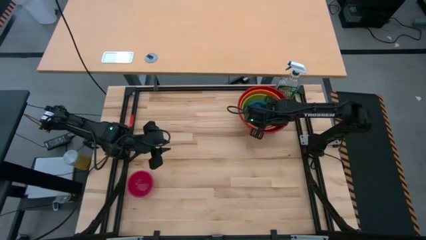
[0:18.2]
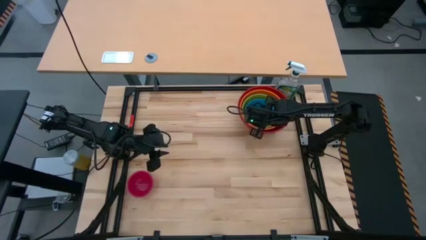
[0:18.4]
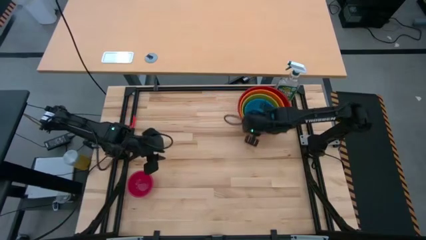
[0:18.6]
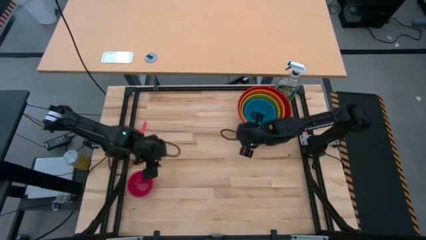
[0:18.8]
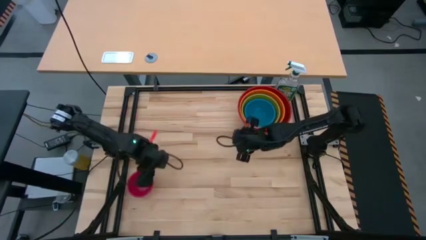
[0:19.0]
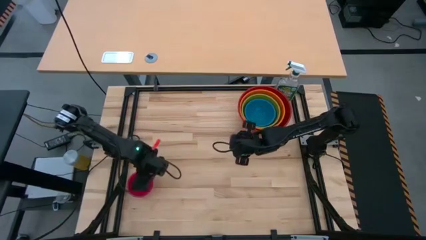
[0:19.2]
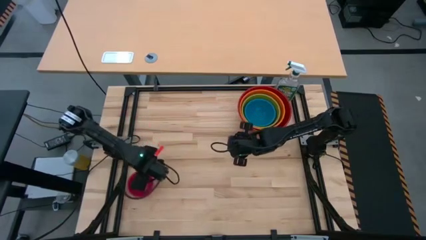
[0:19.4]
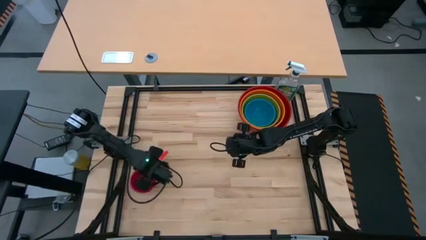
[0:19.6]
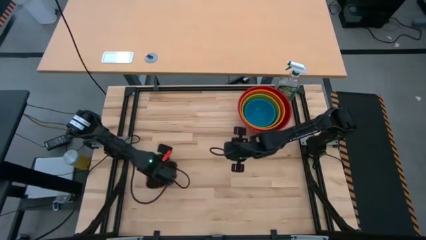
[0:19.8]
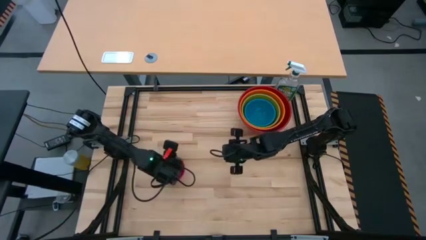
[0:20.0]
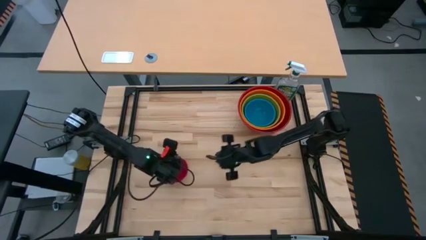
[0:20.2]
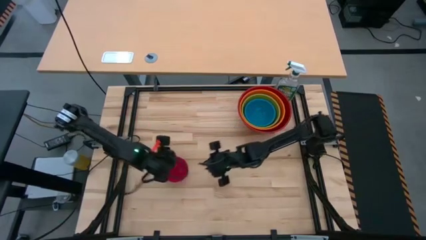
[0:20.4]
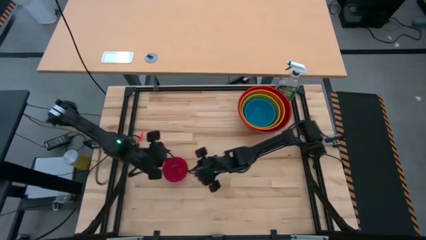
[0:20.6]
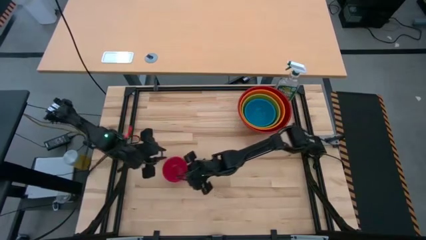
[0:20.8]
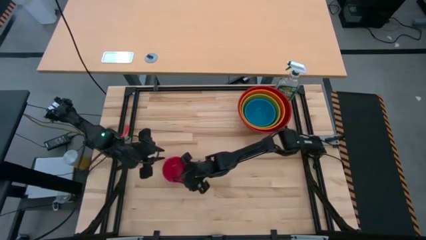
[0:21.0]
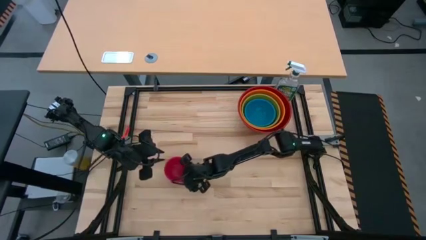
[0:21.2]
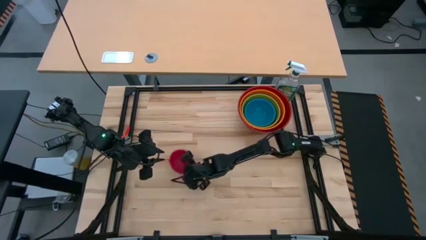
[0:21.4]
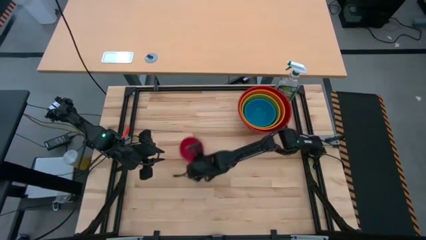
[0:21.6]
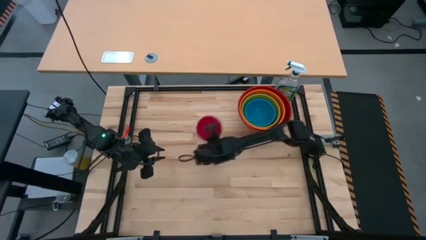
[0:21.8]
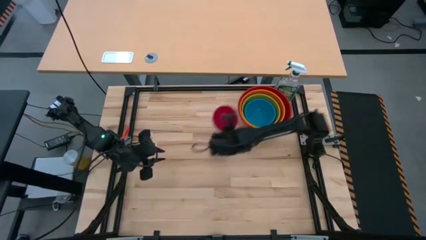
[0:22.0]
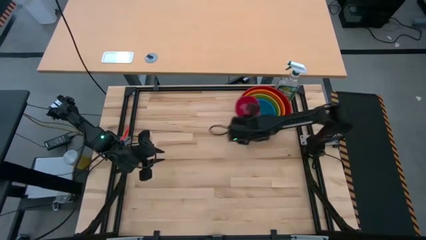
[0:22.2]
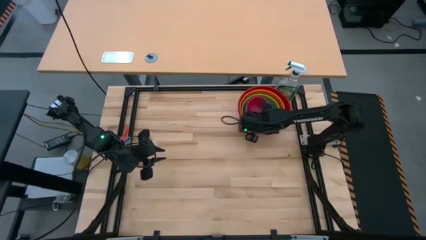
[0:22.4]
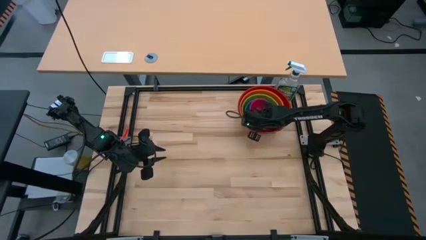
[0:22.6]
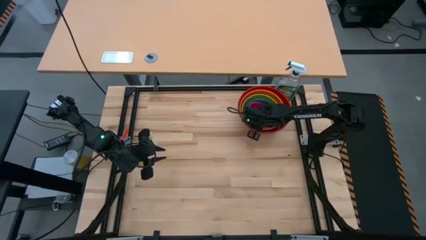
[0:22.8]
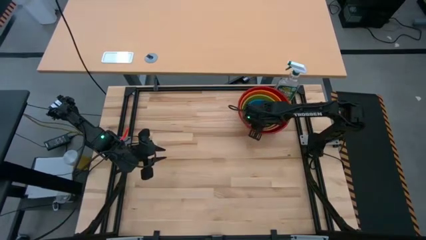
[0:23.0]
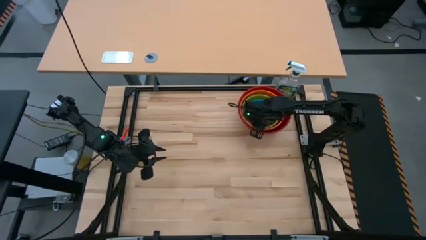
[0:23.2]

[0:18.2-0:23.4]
Stack the red bowl into the blue bowl

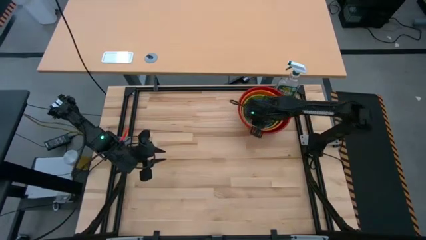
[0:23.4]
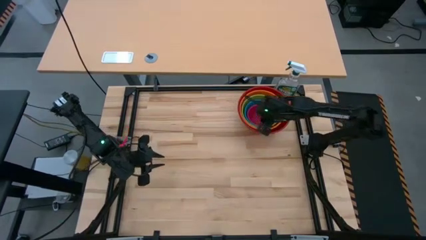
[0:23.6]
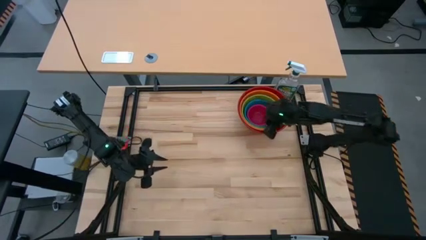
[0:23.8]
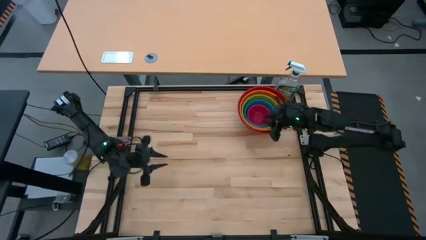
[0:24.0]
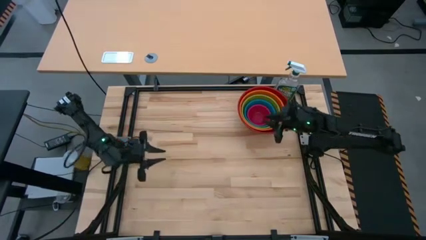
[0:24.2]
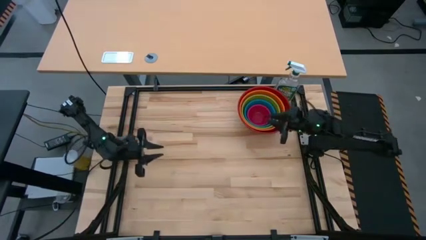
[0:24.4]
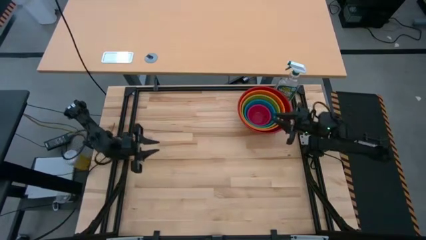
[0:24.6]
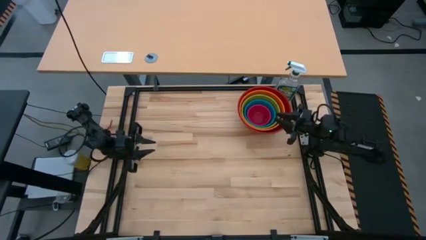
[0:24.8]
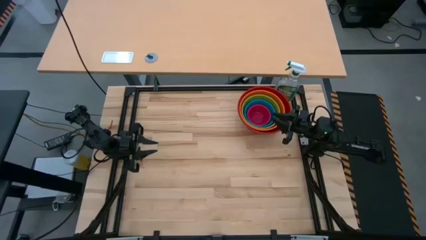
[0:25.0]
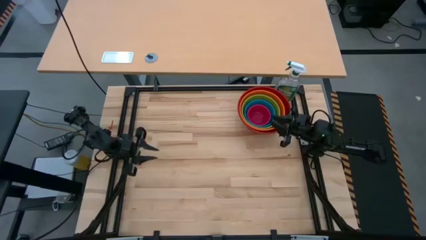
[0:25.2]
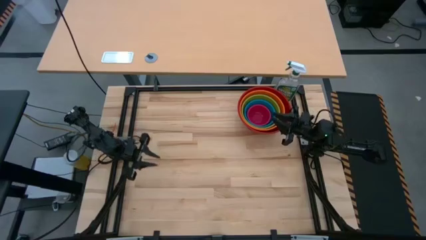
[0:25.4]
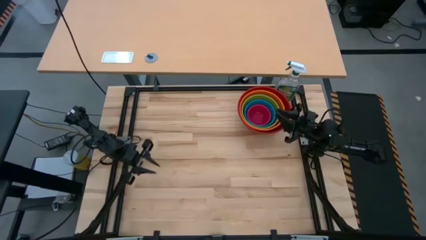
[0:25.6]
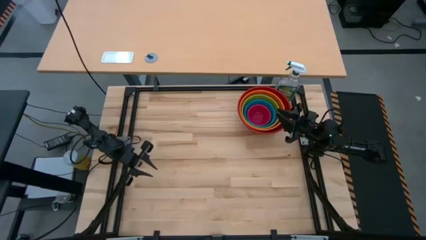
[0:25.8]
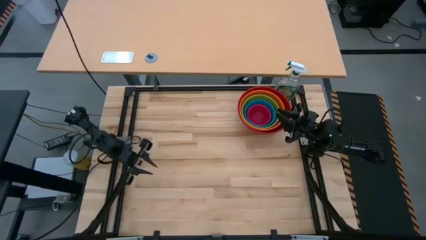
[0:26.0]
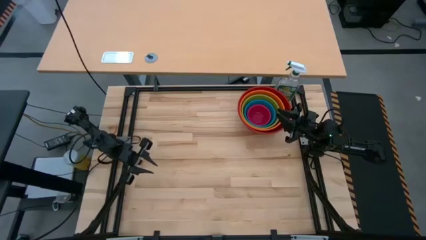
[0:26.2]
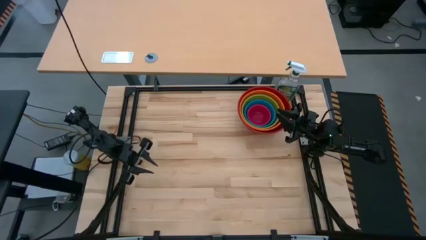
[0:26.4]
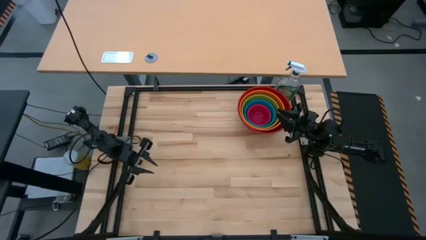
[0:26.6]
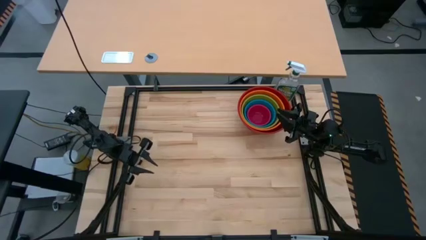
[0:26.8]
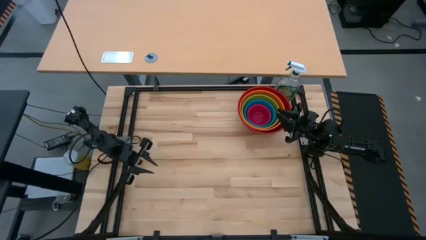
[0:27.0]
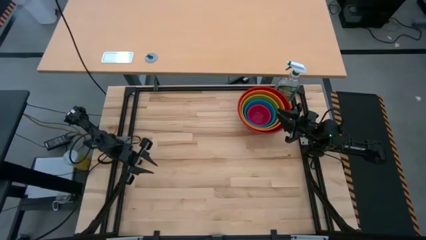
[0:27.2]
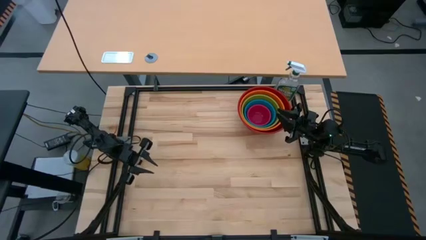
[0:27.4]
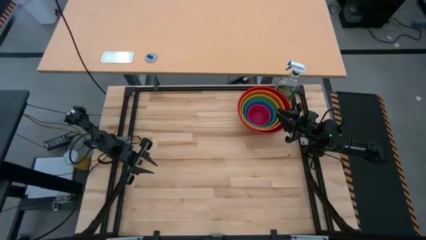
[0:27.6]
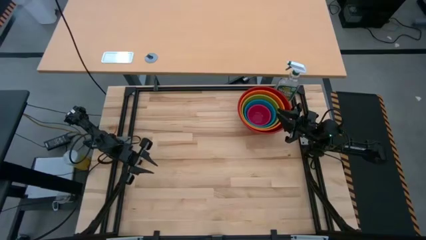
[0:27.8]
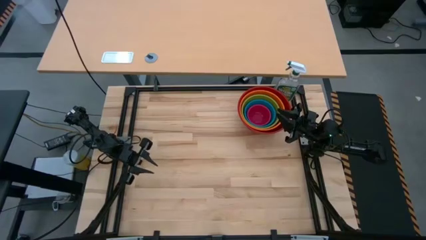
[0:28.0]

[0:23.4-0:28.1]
Return to Home Position

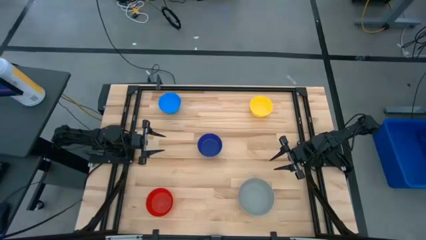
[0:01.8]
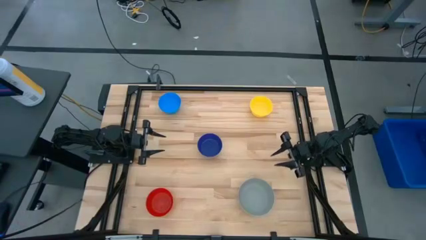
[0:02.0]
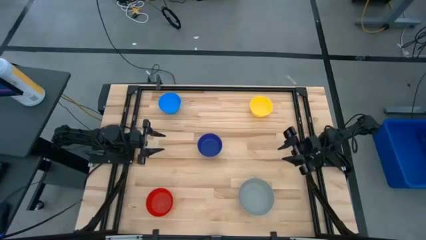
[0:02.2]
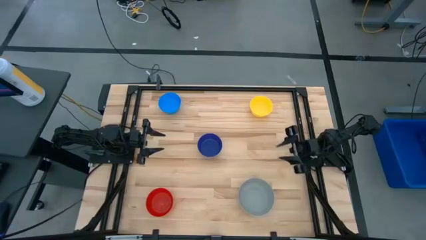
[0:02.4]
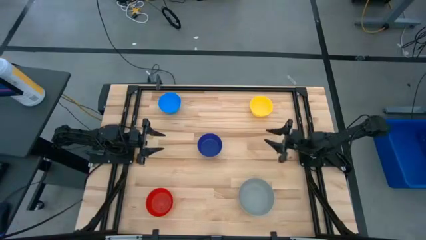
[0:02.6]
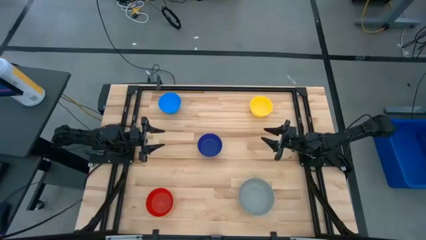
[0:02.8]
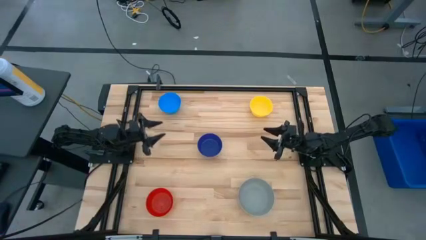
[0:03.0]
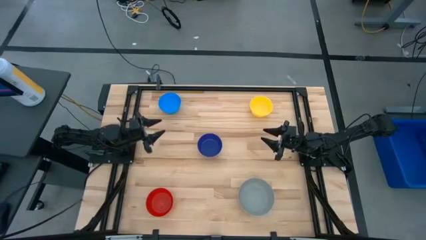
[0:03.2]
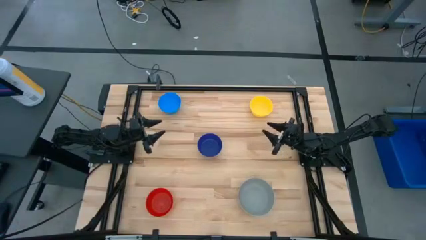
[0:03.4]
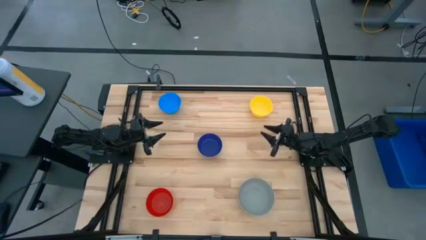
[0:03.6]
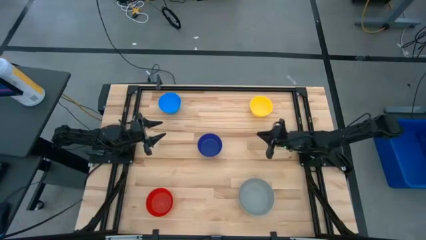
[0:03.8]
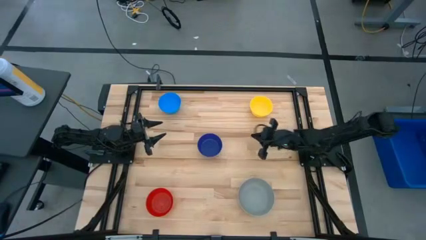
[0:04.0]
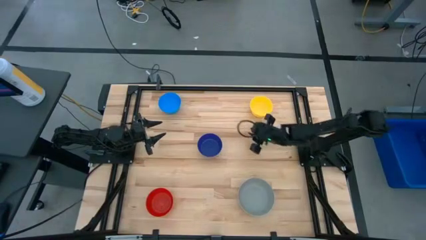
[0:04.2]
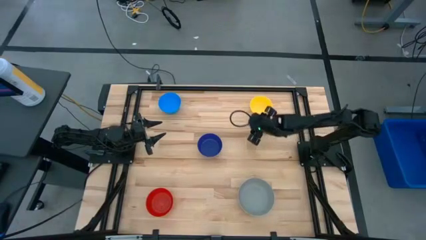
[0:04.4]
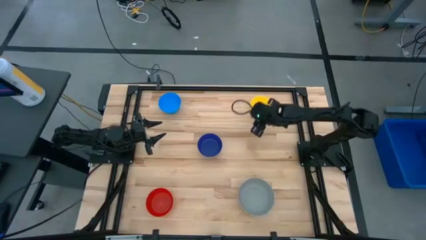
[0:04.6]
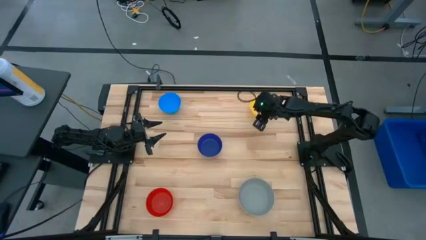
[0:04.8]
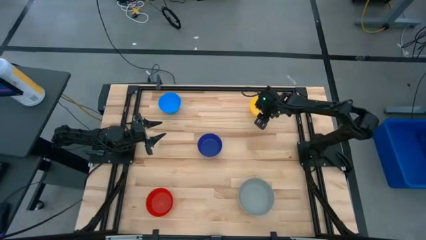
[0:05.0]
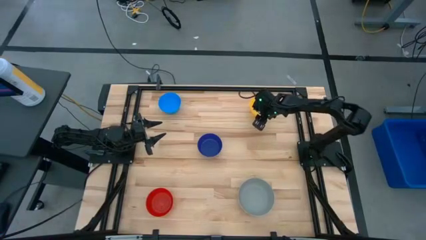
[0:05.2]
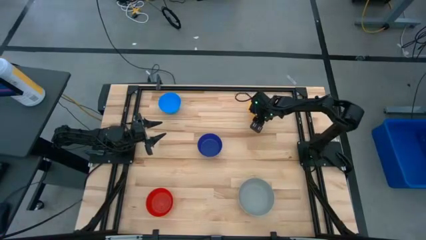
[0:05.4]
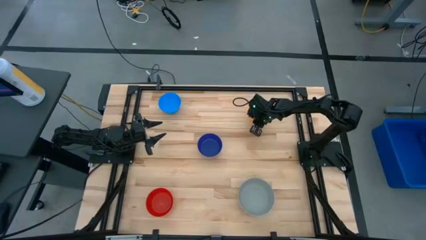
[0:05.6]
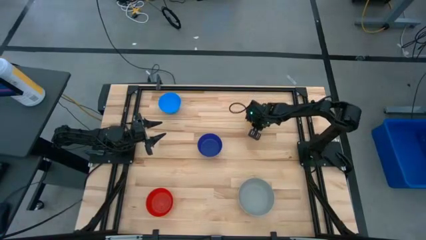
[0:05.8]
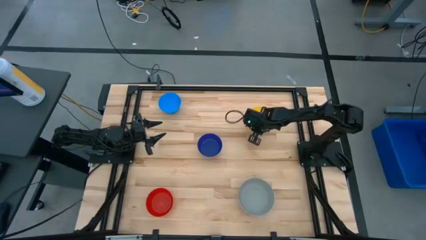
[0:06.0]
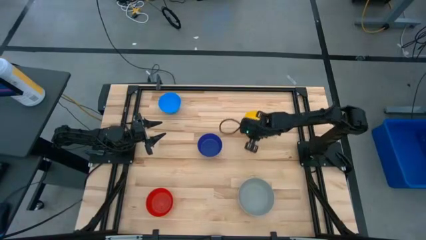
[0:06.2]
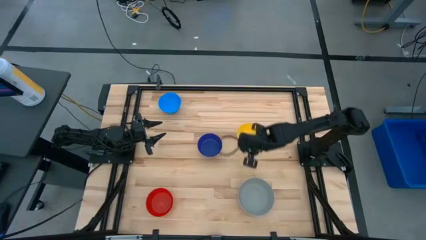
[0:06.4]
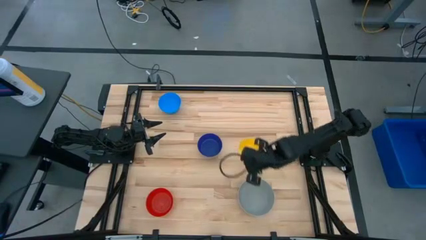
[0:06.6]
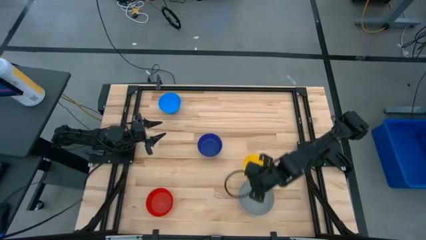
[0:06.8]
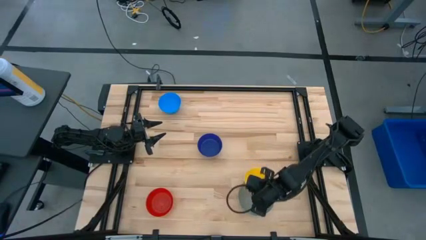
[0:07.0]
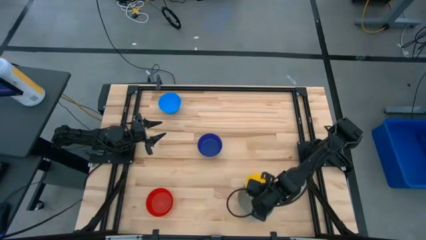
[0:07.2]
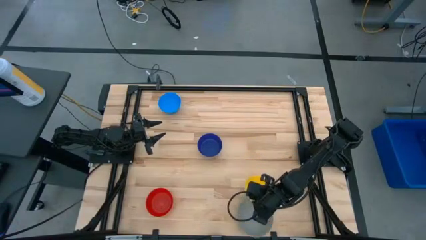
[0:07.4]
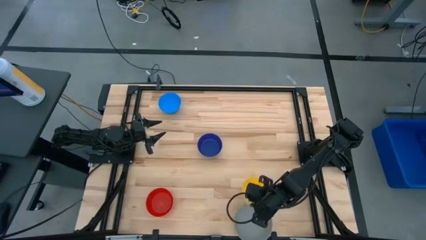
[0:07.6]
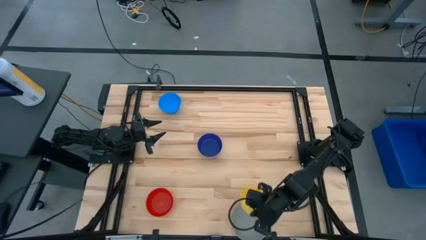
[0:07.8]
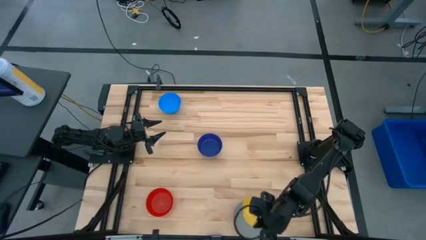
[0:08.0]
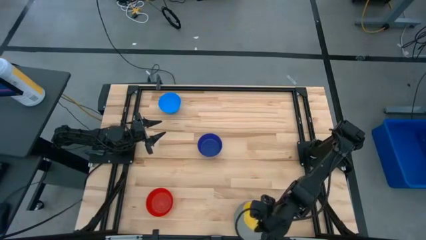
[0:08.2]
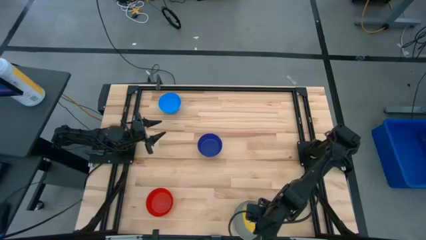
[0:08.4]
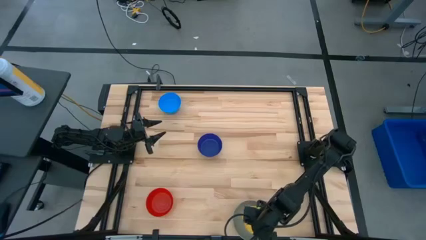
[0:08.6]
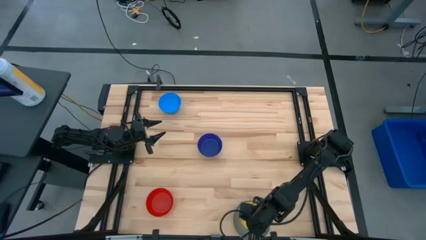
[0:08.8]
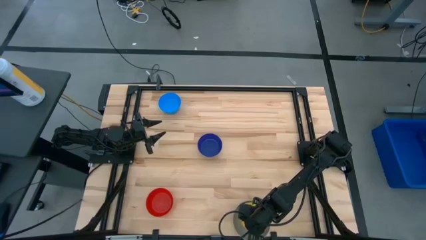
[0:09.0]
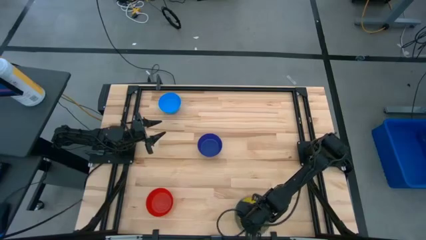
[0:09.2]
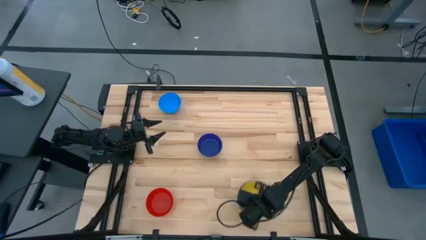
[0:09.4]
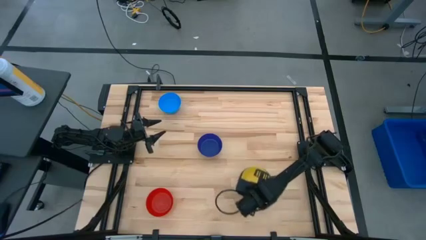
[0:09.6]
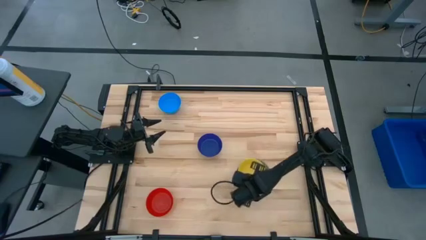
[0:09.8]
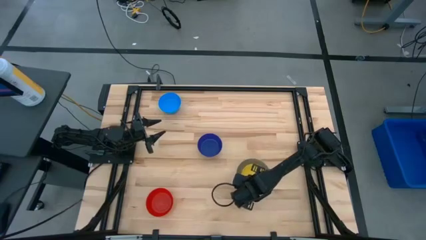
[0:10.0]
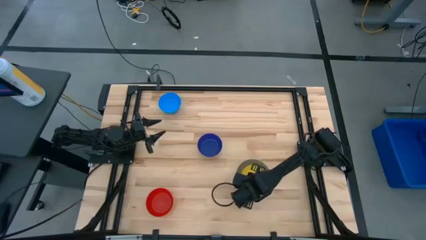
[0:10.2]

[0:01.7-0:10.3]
Stack the yellow bowl on the gray bowl
